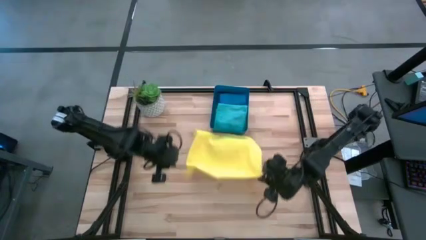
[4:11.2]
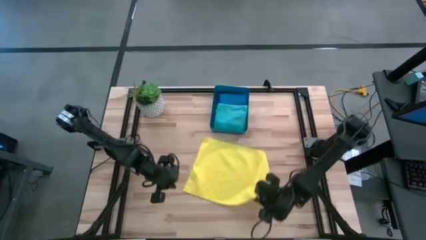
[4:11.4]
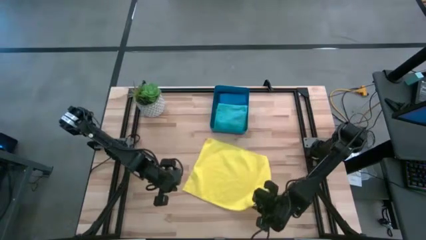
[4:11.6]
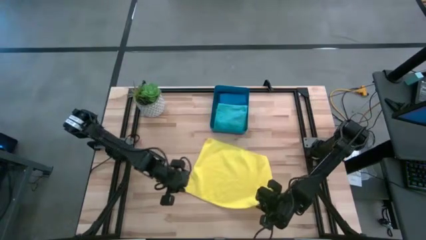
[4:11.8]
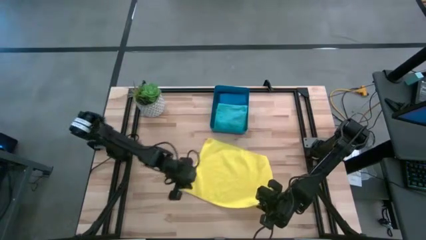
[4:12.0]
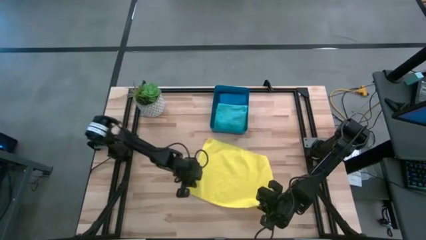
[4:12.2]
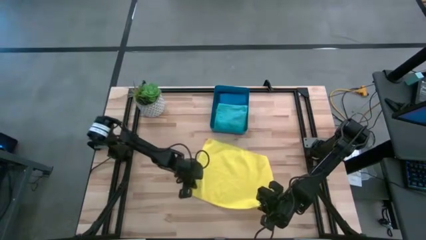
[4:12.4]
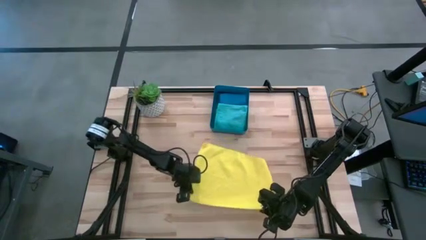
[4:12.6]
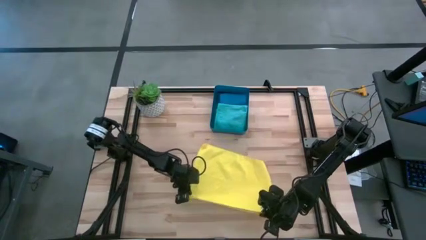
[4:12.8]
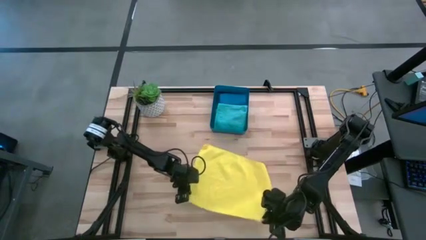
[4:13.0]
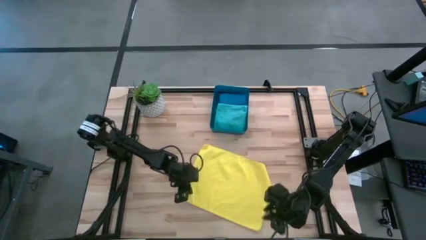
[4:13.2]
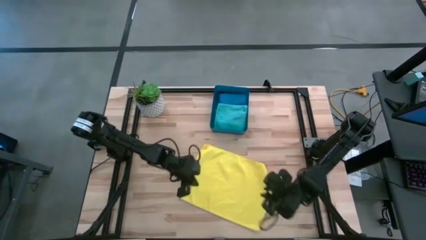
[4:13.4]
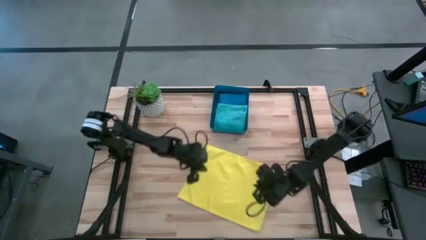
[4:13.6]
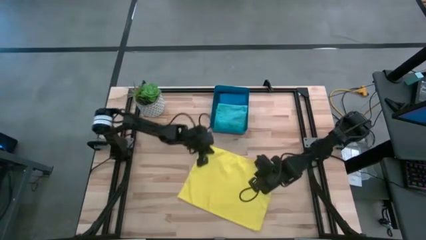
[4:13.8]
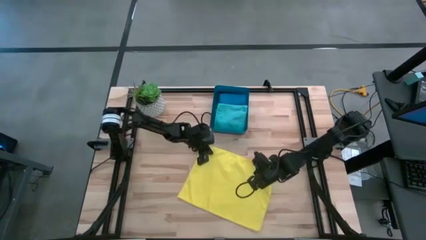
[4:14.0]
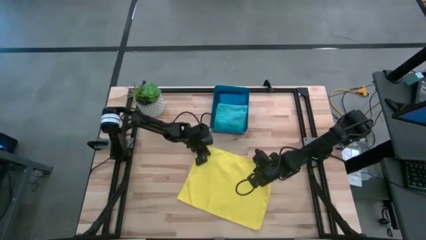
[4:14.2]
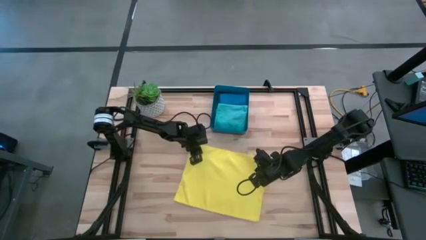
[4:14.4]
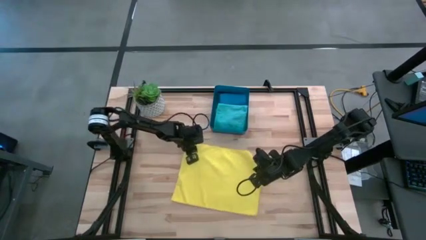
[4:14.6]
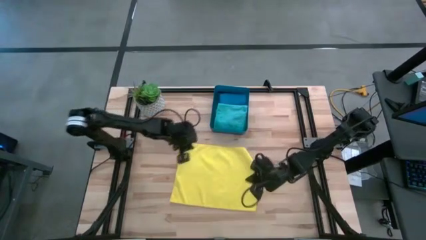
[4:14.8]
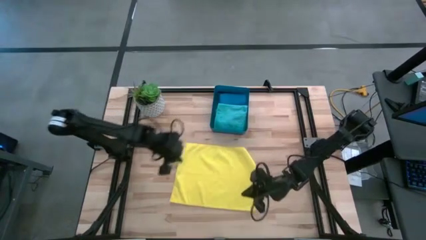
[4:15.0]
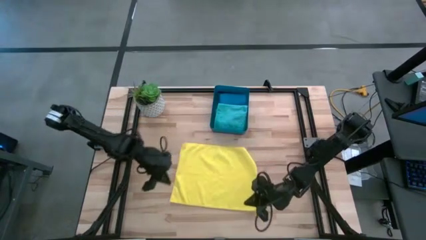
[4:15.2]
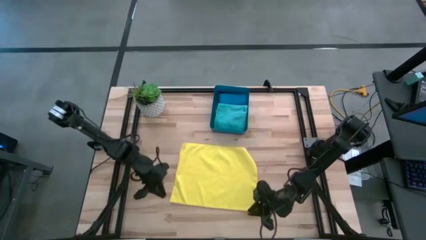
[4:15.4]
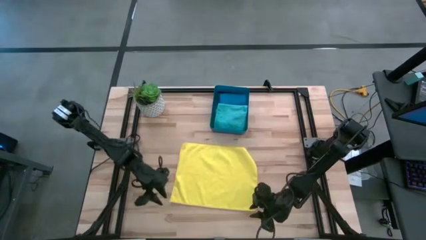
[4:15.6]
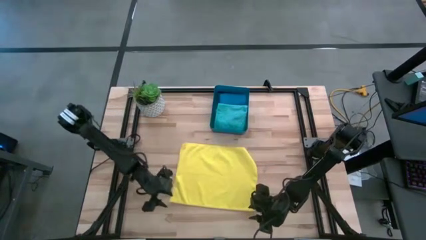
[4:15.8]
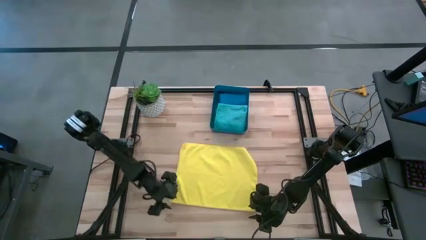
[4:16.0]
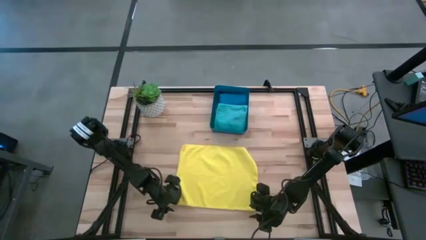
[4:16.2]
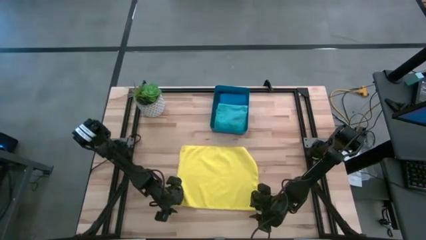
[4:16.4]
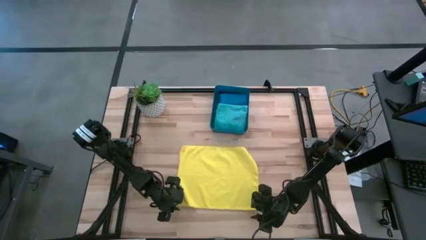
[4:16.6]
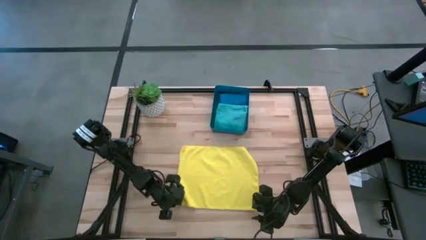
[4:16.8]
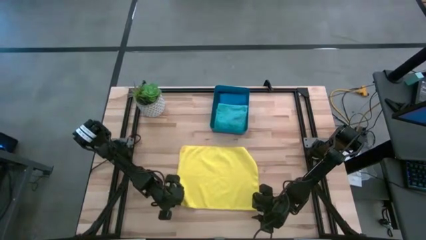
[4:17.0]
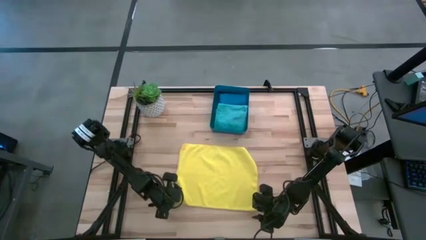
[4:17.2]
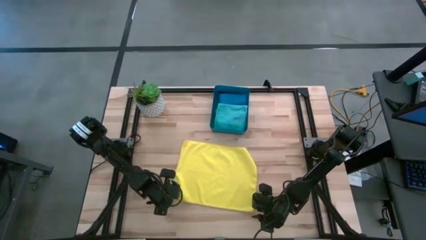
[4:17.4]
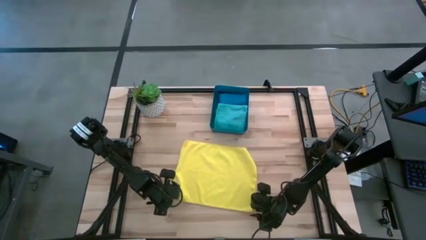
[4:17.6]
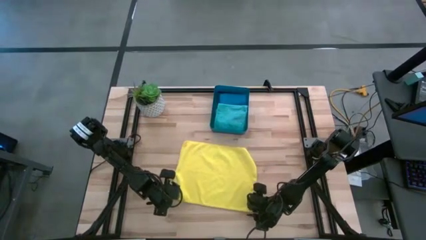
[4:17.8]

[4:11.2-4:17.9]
Task: Fold microfiber towels
Fold the yellow microfiber cloth

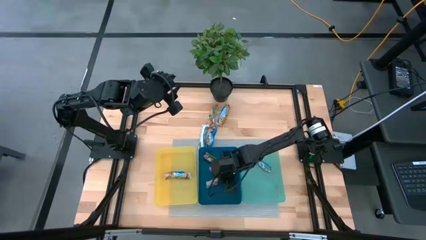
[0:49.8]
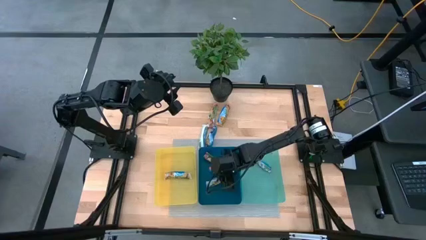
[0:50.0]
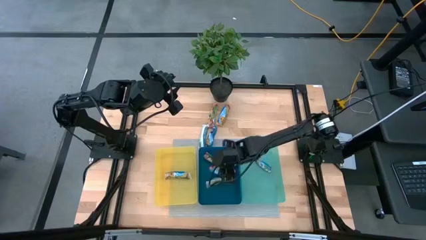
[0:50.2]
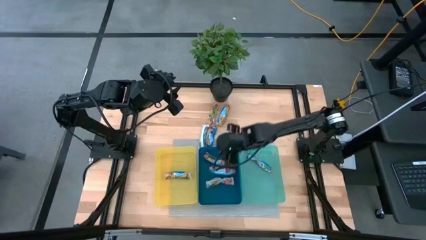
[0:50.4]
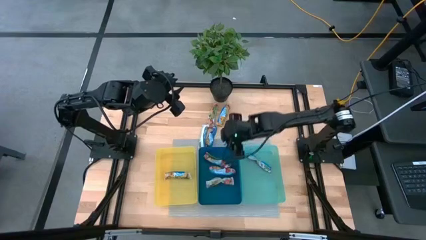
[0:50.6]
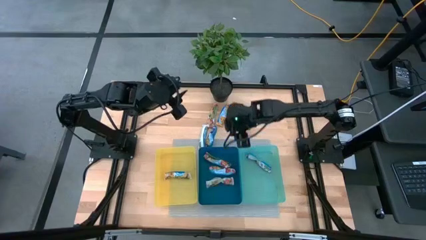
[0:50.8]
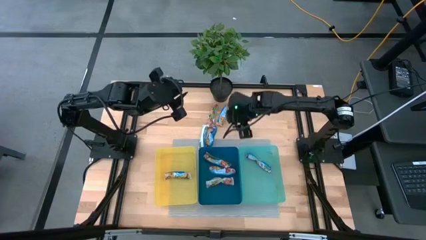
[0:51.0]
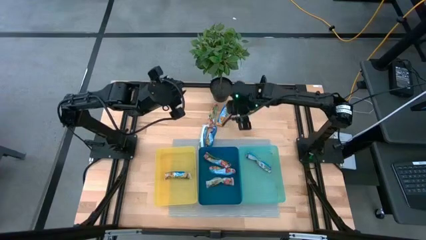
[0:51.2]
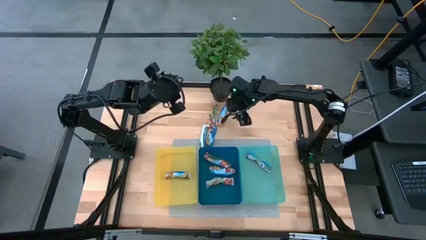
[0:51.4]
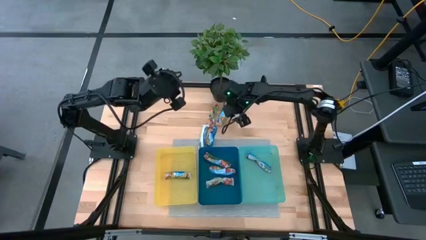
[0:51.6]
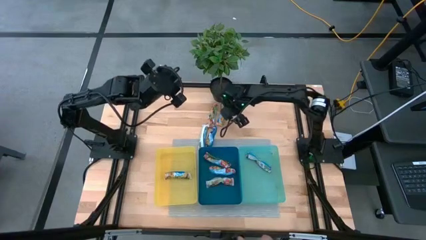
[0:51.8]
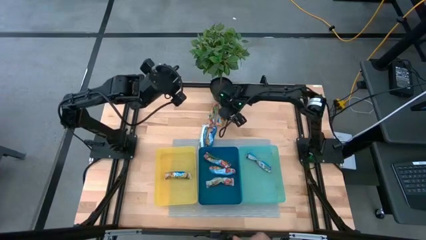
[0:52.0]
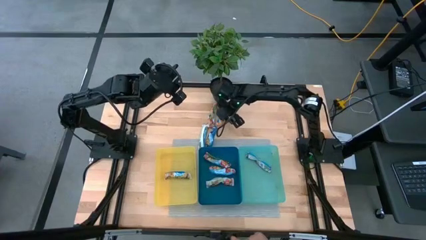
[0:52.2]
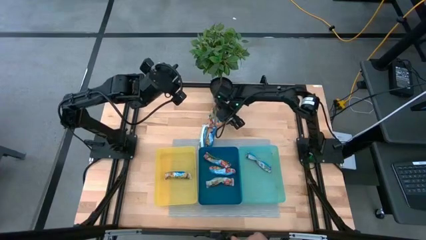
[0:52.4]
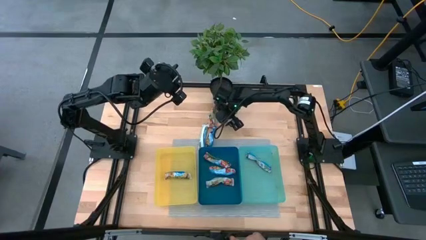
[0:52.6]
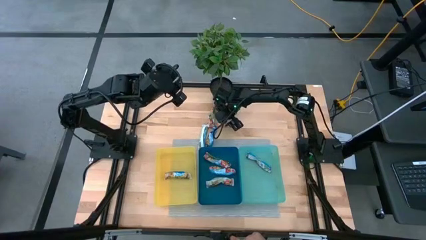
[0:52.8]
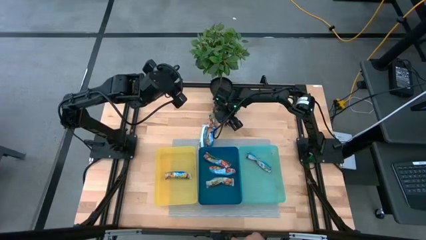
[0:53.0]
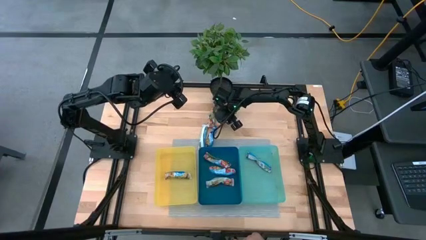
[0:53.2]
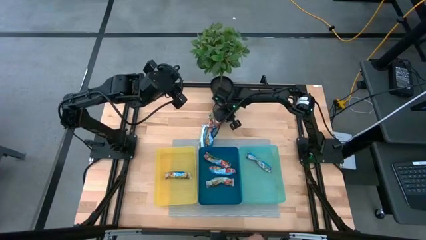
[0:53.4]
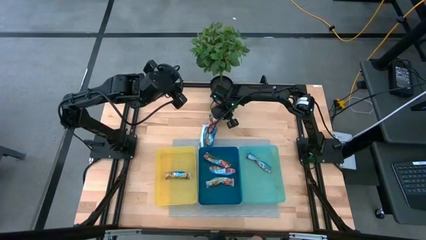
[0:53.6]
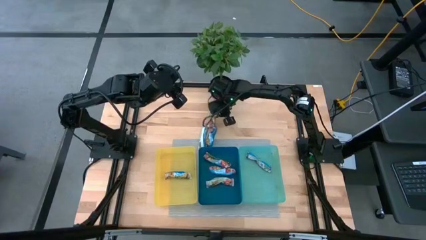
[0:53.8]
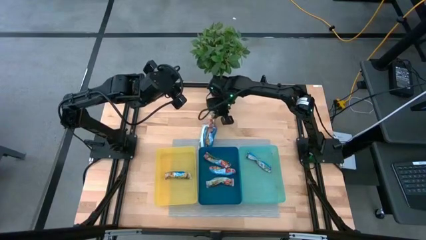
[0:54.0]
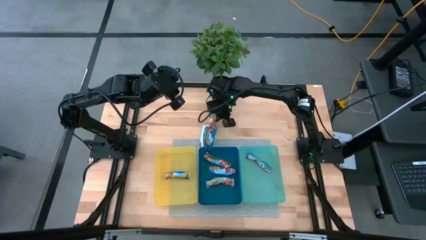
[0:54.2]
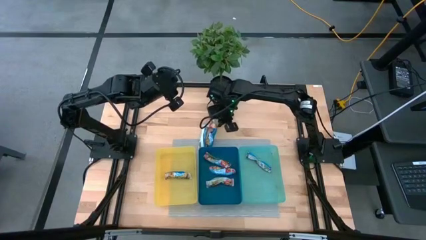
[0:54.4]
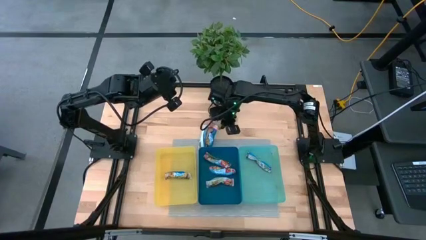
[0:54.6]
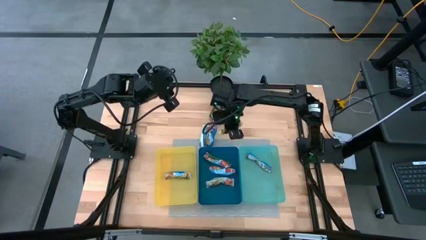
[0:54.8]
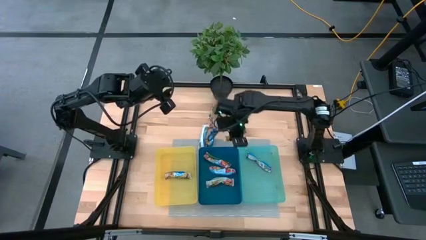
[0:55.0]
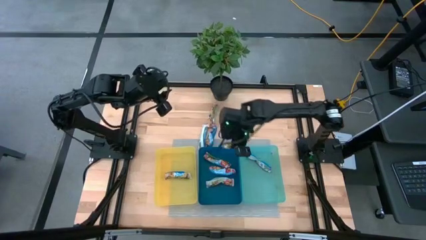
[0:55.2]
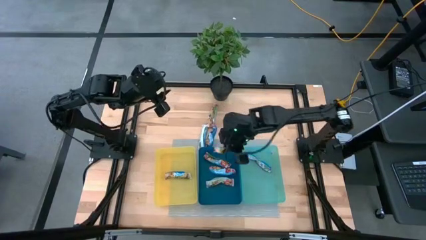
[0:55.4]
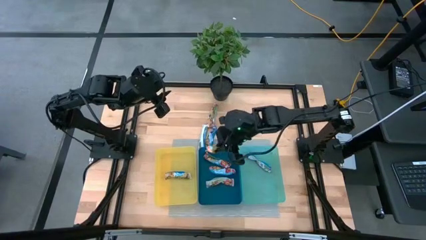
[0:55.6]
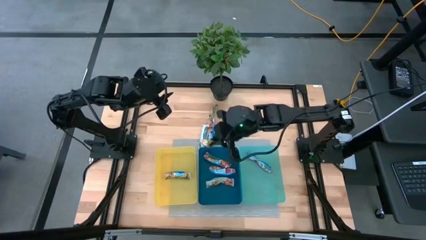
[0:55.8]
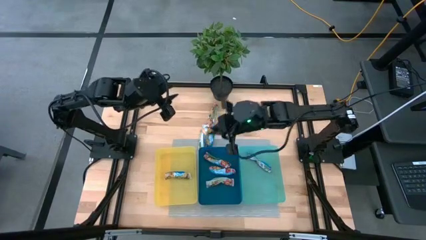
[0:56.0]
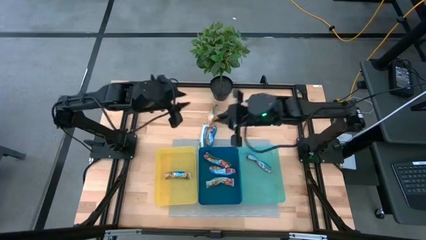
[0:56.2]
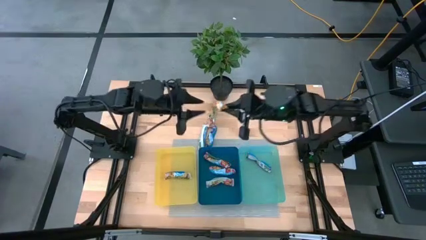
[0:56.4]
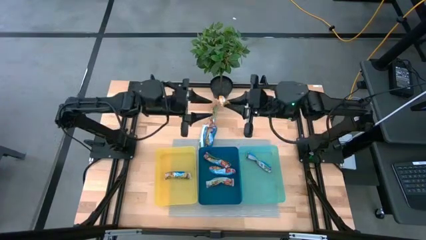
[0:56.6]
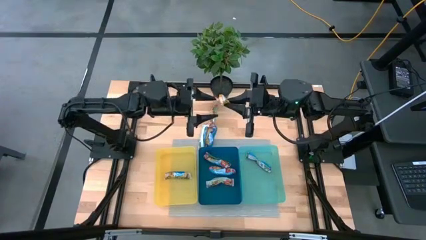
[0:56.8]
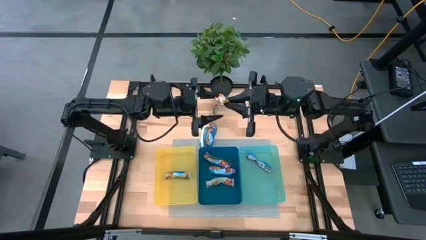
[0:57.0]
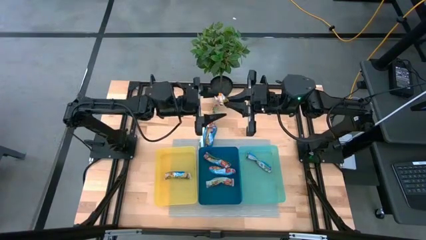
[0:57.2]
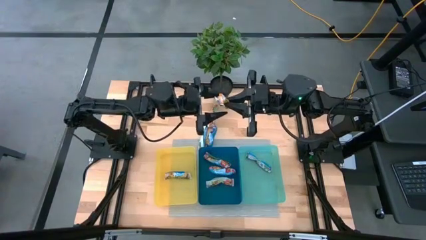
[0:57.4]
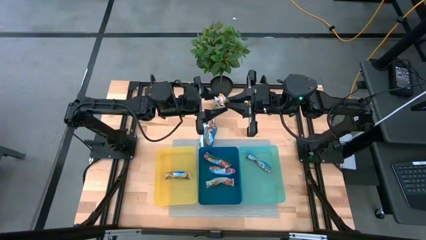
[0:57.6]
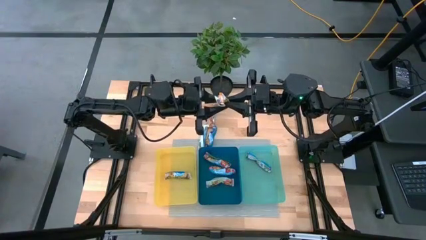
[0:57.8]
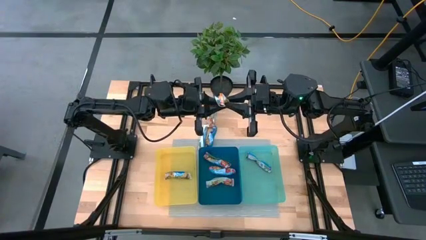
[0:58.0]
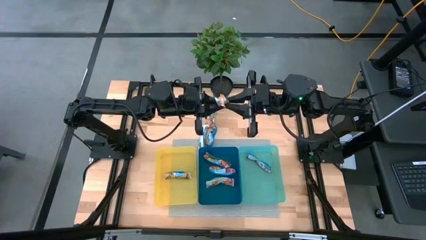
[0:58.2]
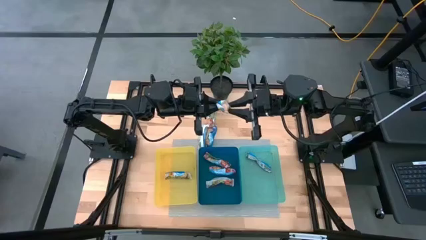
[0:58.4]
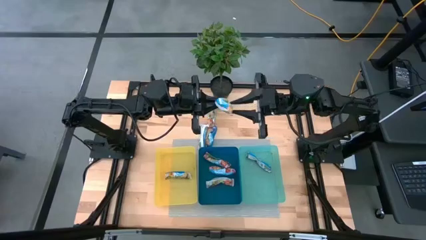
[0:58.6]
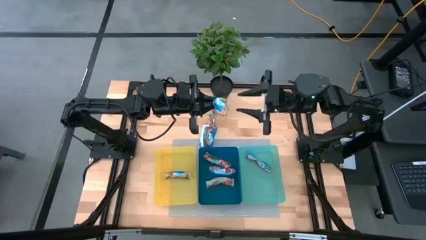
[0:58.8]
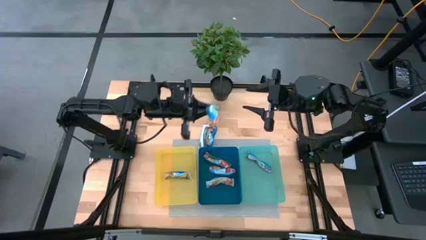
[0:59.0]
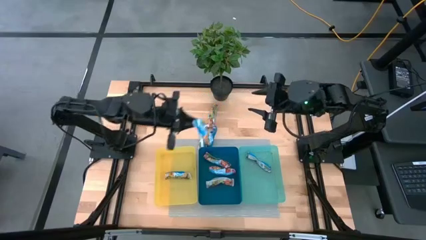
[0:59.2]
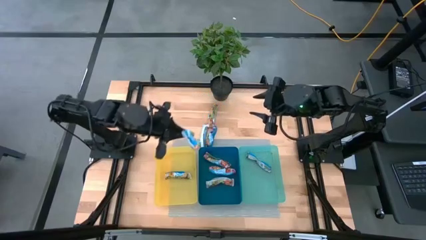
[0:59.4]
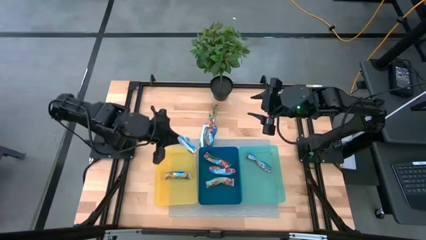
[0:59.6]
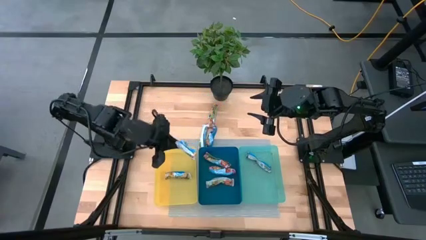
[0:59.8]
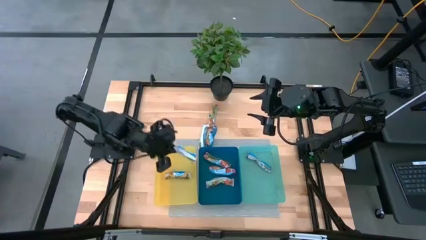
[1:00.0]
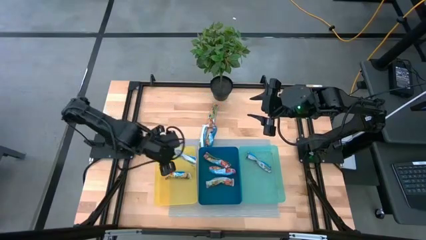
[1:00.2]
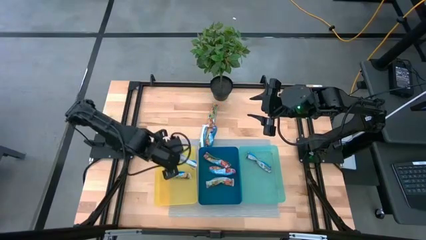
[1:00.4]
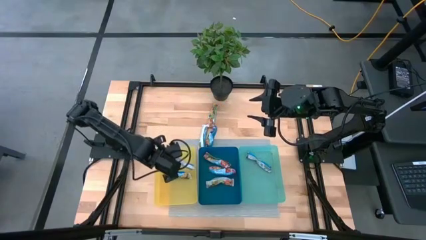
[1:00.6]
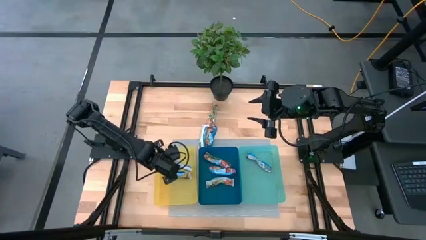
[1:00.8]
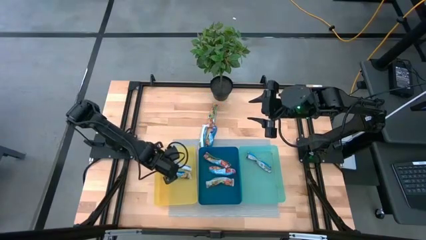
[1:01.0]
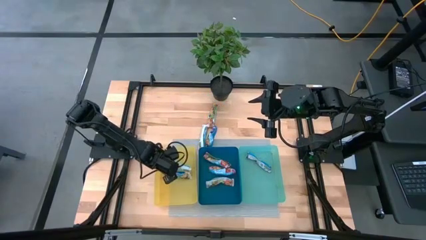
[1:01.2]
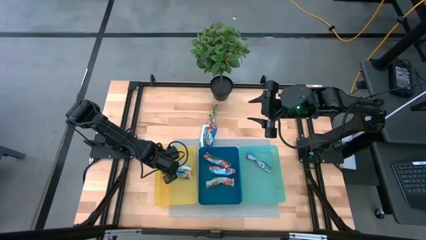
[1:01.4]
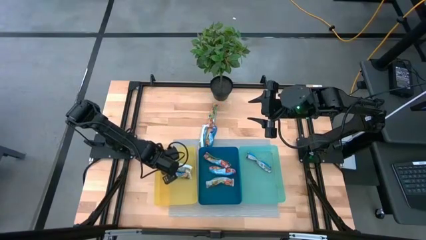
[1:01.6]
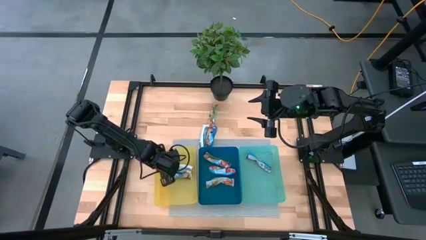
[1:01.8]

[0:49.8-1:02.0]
Task: Pick and place Granola Bars by type
Put the yellow granola bar into the yellow bin
